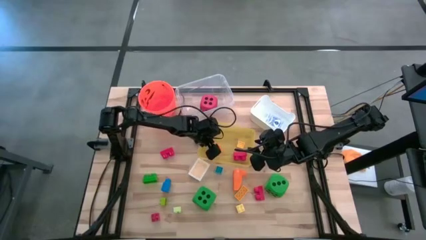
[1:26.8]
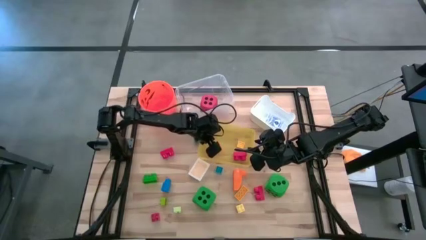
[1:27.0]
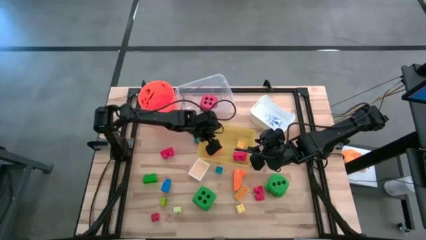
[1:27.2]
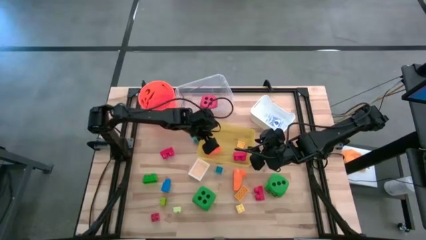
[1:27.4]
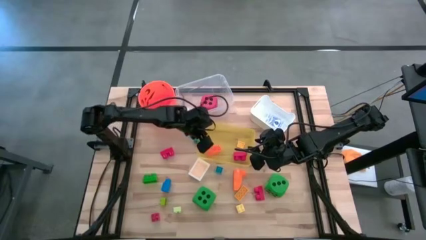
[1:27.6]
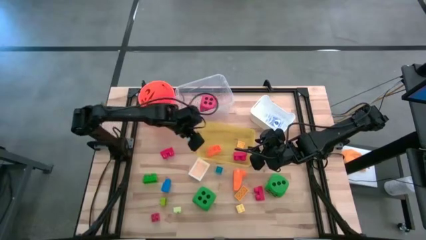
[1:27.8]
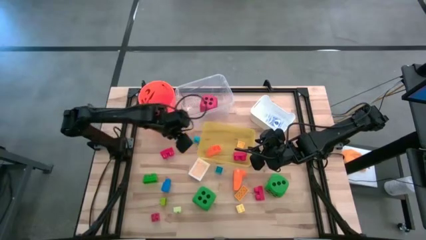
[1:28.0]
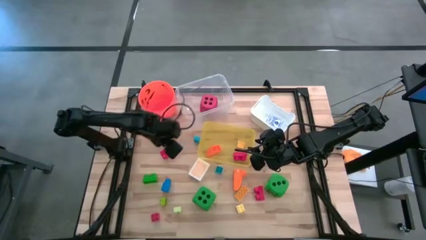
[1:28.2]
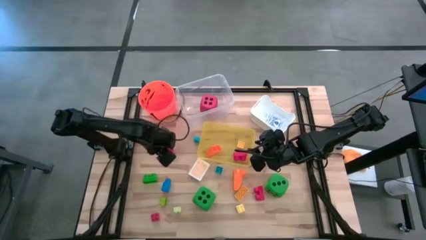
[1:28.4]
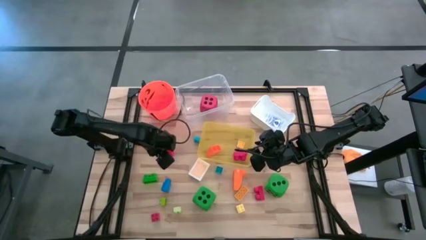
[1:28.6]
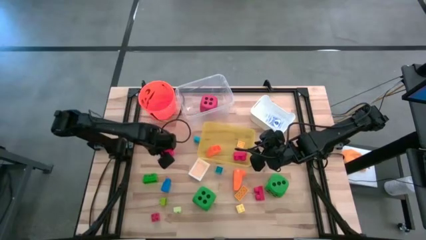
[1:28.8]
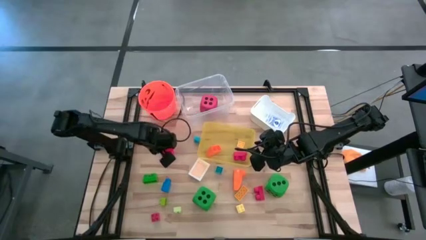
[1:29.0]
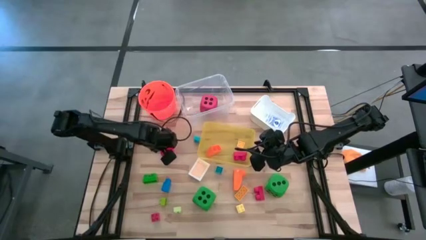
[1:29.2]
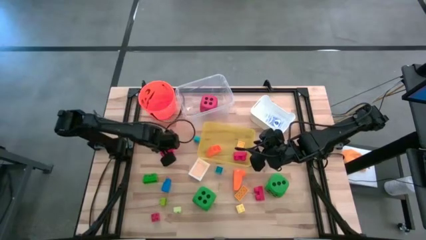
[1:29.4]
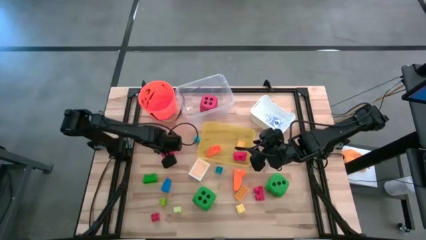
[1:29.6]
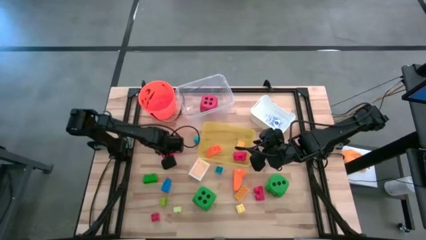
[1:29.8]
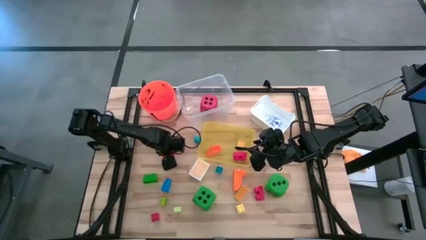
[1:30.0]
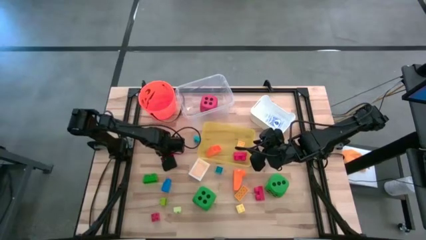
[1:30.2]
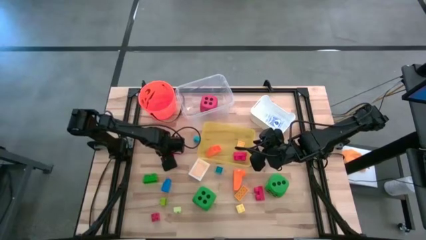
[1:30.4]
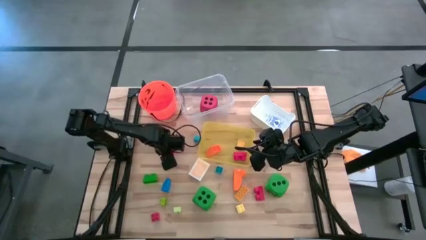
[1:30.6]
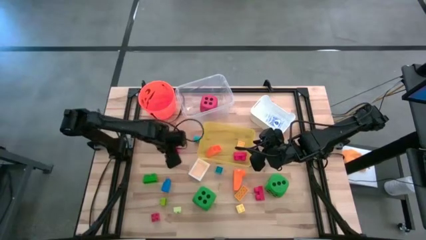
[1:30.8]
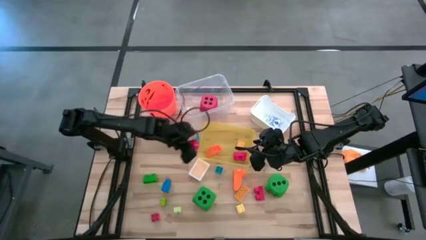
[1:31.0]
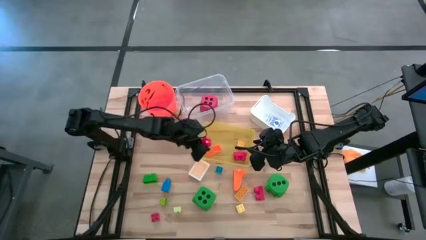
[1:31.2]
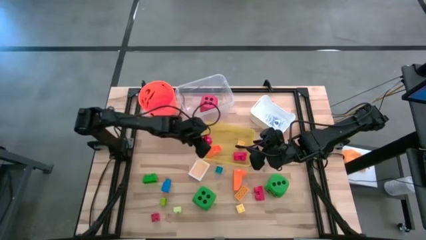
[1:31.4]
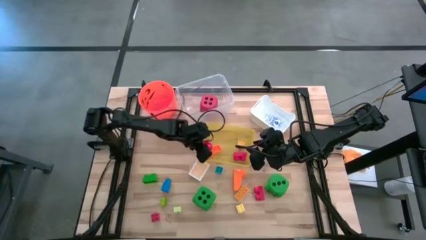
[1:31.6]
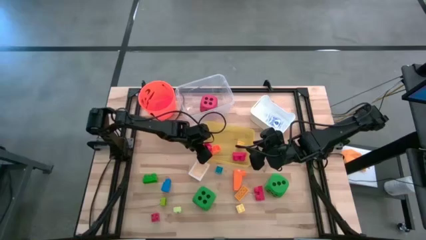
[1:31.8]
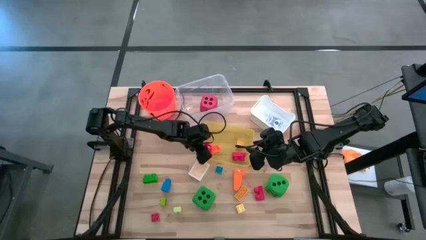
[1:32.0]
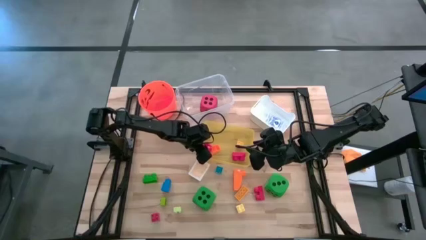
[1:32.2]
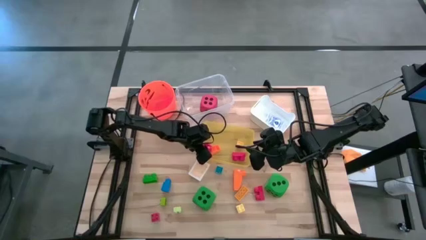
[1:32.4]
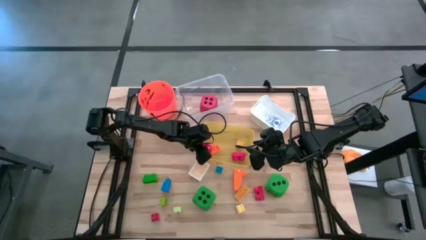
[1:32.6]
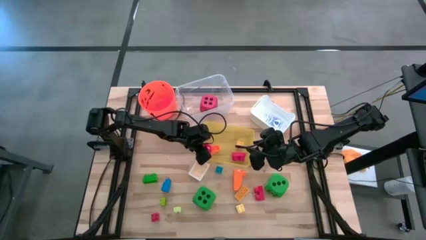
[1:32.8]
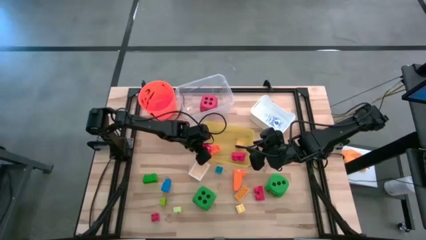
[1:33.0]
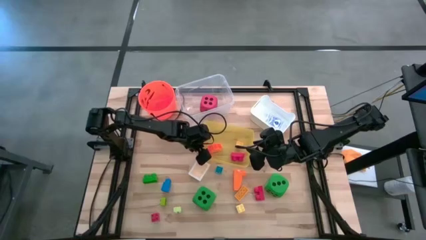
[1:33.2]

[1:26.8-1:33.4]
Task: Pick & Place Toys
Put the red game piece into the yellow bin

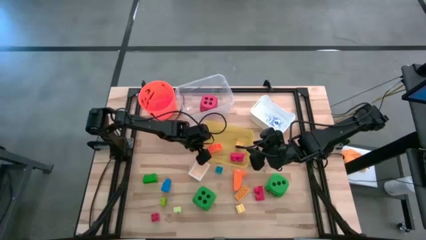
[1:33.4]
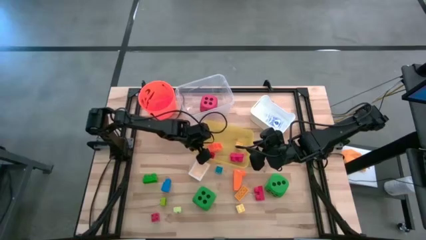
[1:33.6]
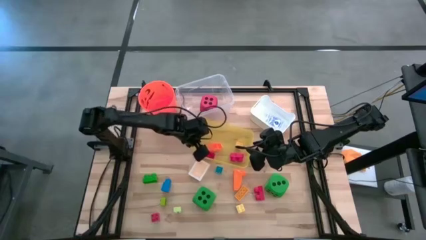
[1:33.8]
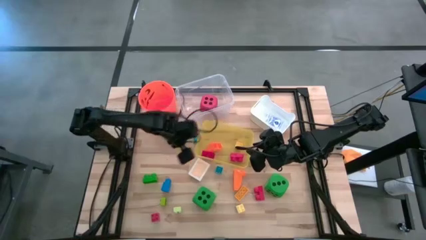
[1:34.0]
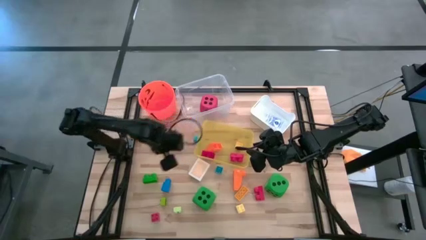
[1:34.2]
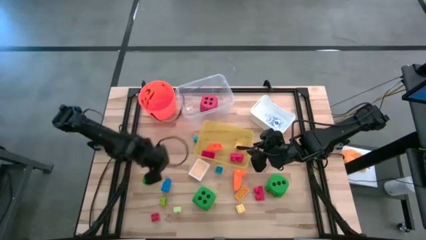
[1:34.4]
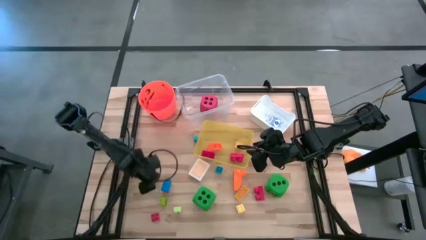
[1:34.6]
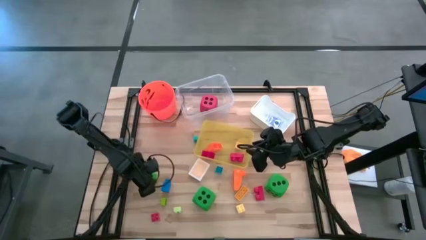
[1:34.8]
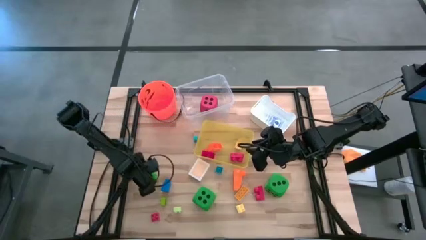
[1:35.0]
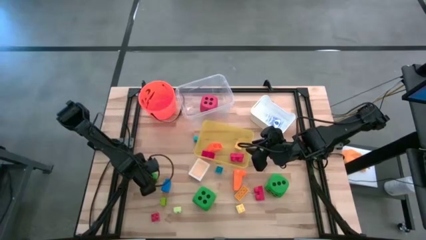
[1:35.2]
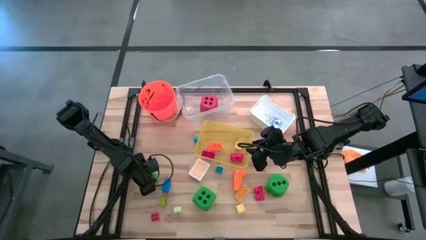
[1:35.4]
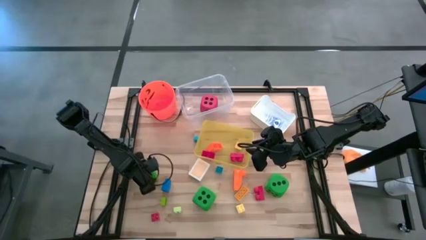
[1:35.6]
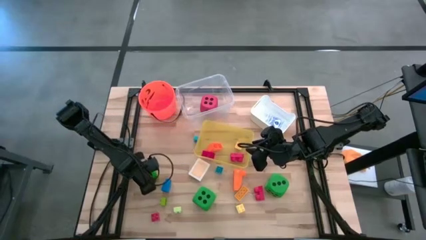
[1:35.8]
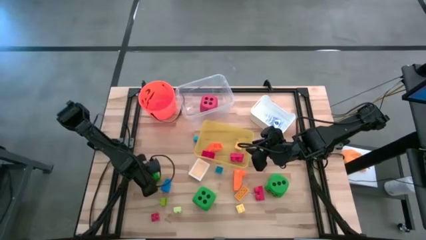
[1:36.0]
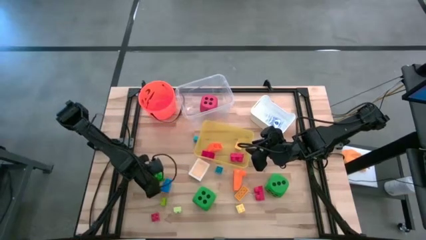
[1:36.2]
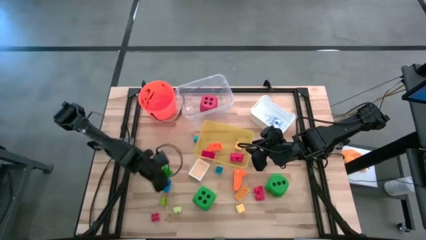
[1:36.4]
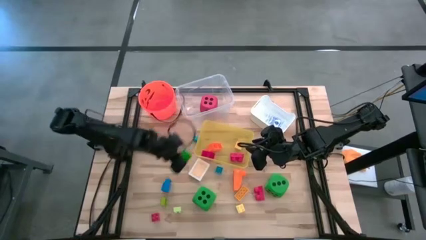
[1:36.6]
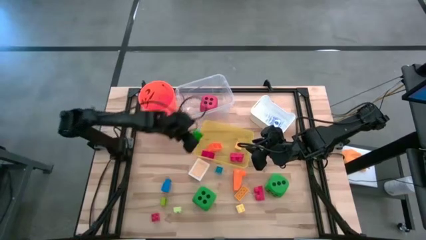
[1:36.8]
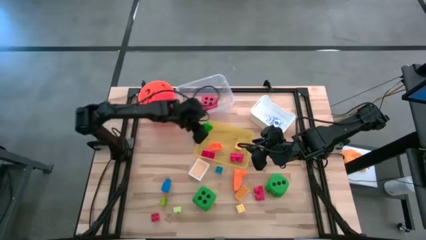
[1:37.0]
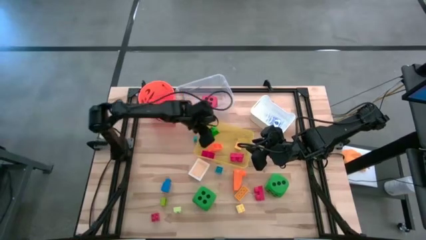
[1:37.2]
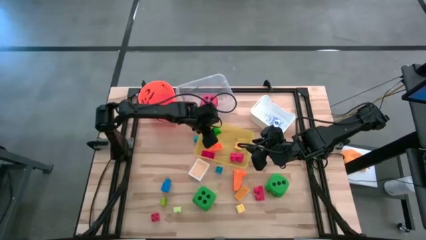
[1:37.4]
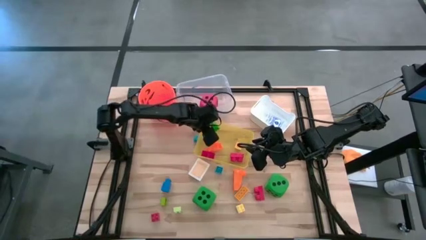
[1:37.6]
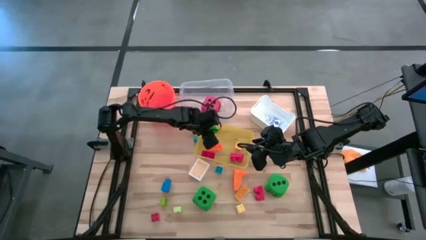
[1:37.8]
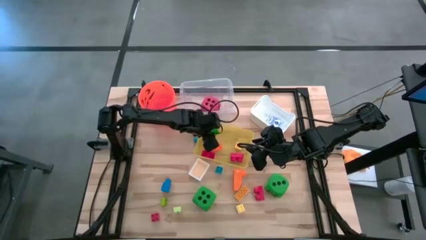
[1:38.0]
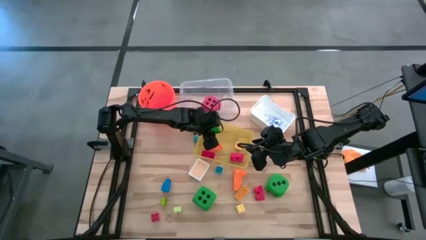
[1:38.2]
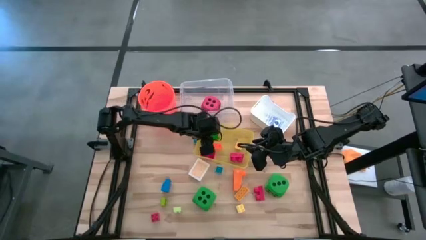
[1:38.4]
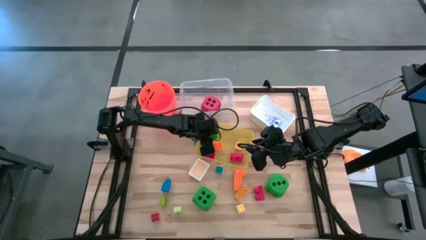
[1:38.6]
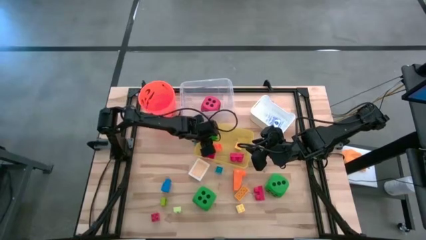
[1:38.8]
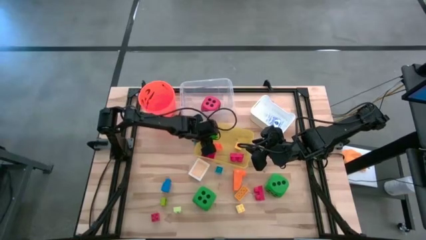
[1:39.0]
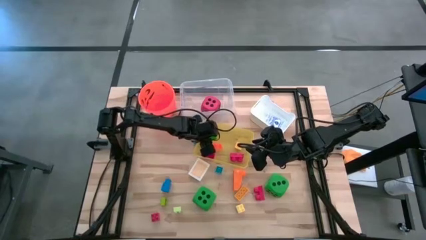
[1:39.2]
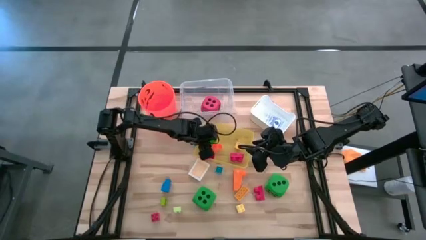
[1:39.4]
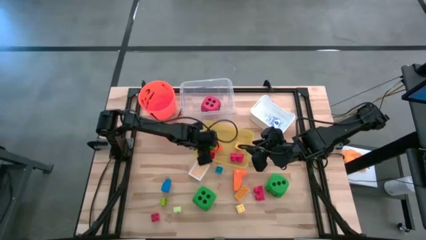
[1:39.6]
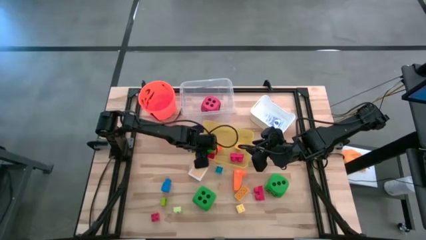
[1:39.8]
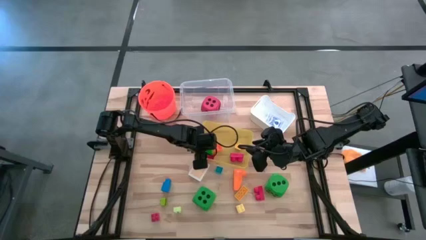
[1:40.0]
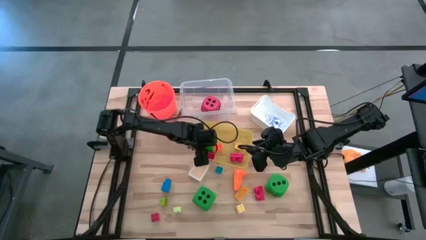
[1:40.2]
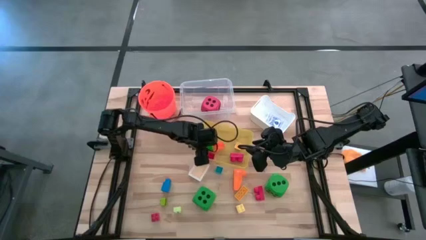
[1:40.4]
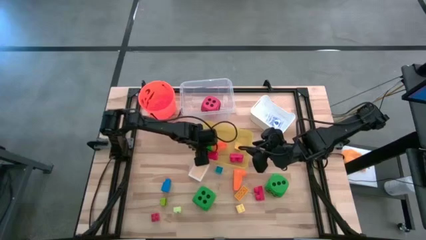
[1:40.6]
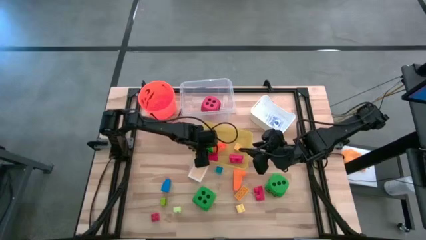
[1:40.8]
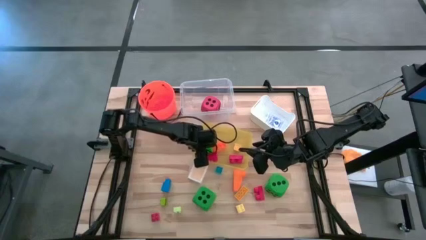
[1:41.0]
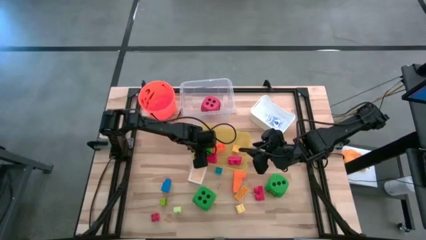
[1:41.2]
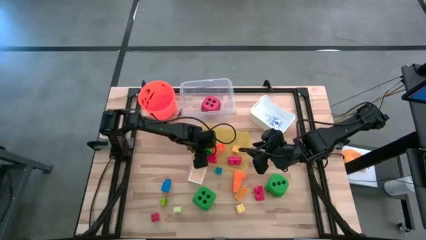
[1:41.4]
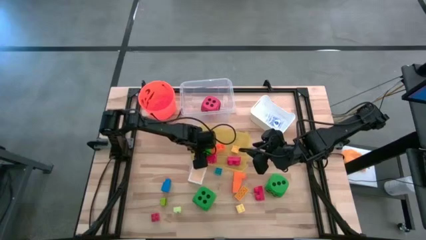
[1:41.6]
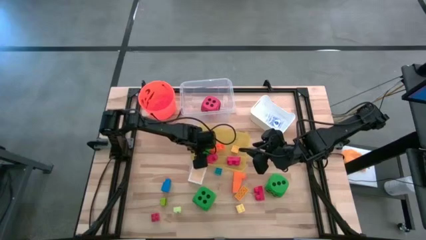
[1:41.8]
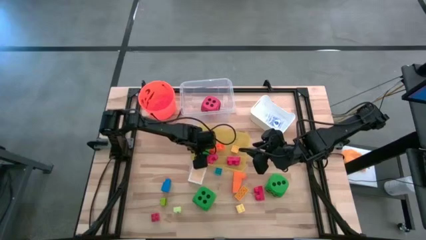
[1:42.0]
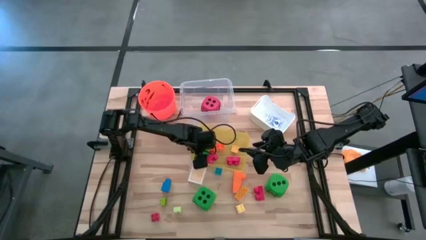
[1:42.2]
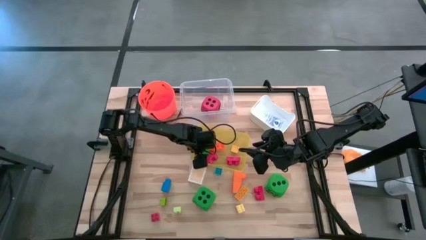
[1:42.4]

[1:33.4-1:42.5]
Put the green game piece into the yellow bin
